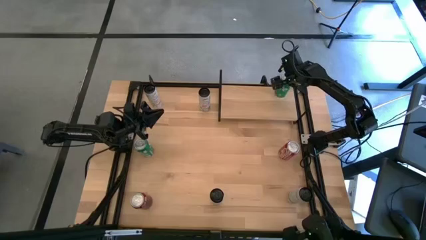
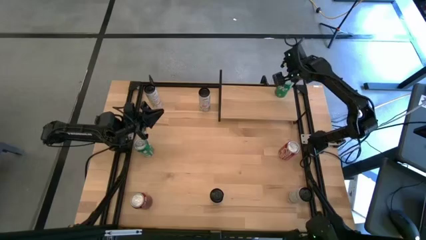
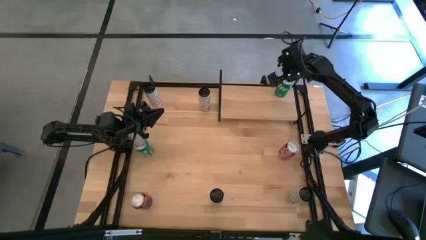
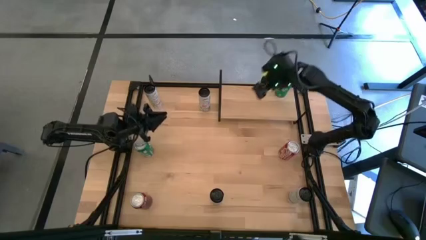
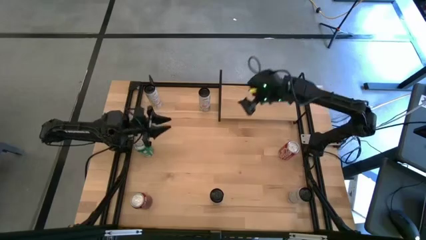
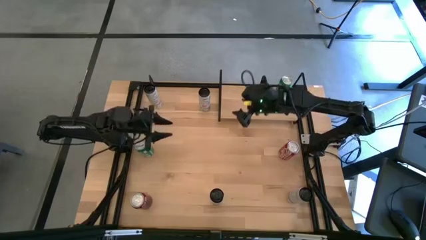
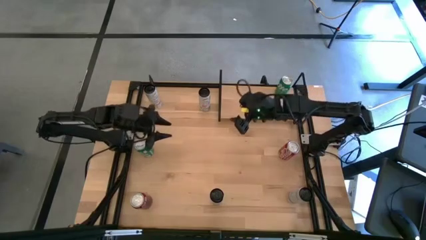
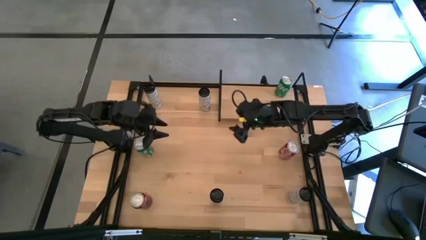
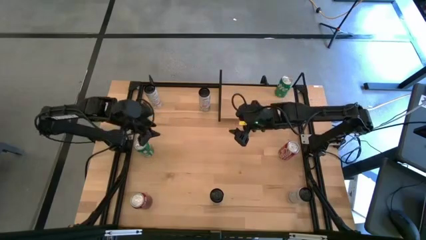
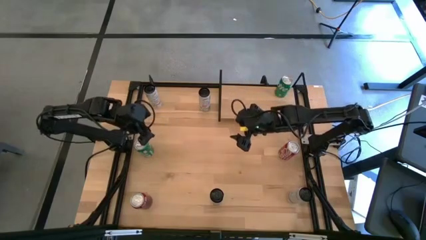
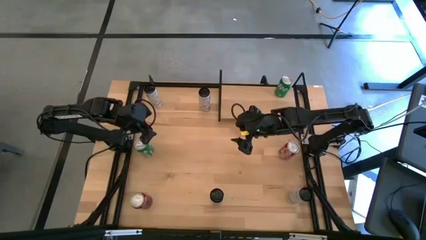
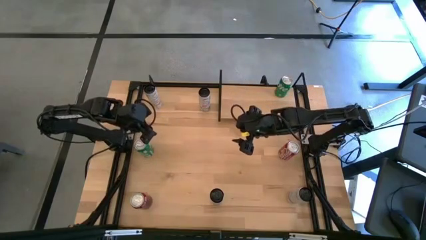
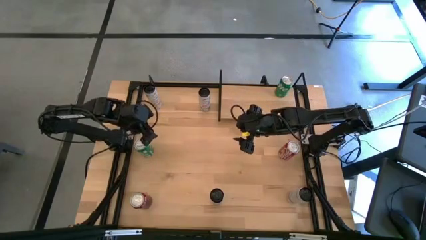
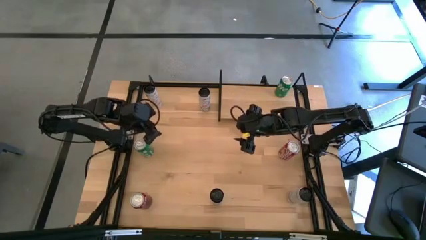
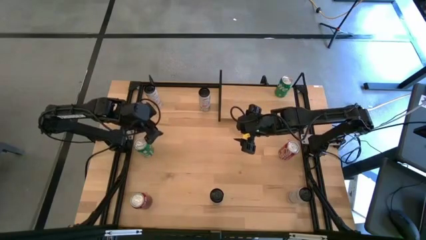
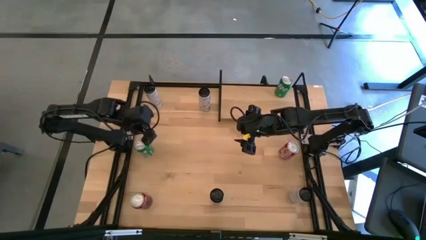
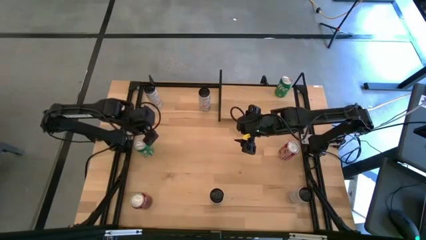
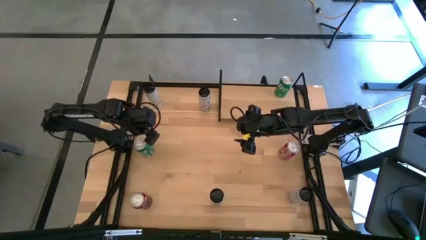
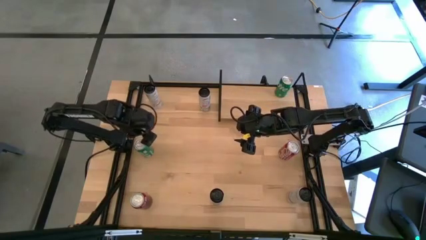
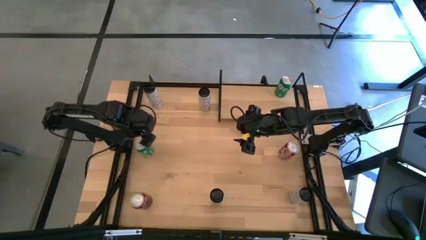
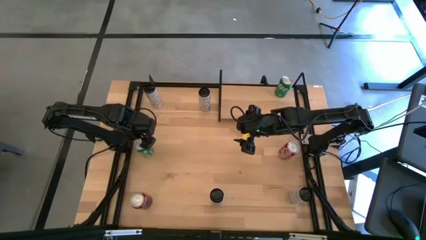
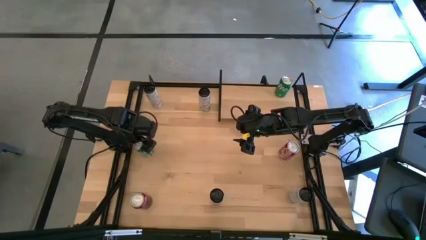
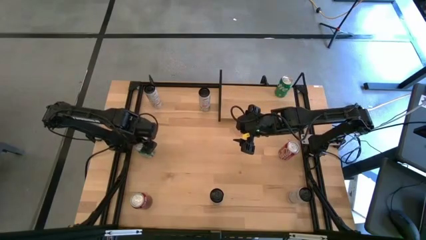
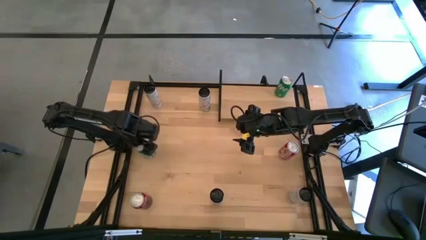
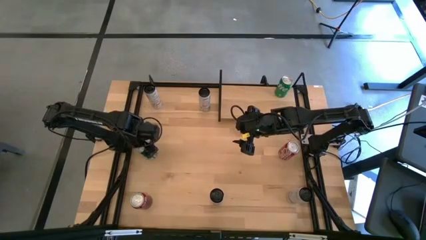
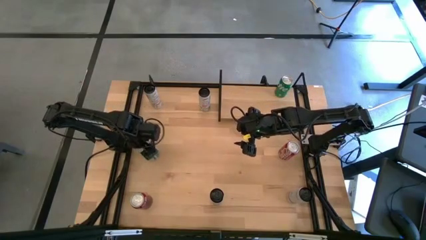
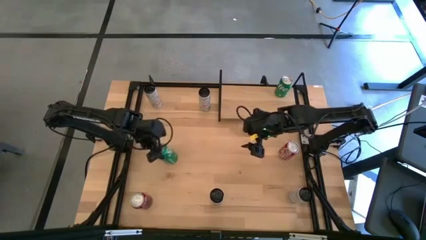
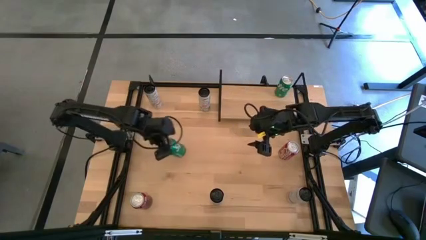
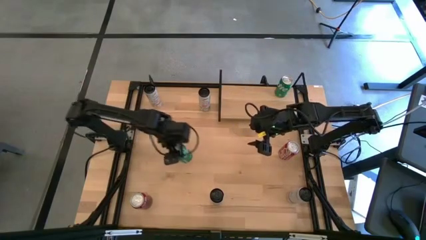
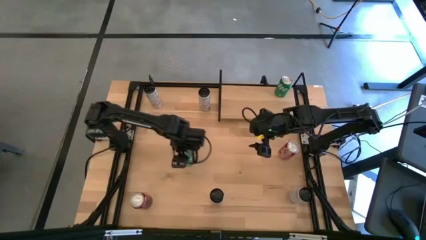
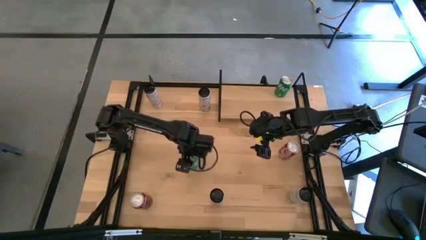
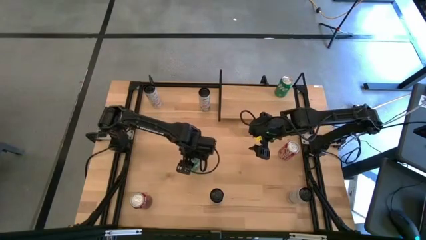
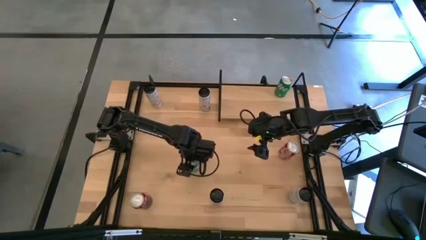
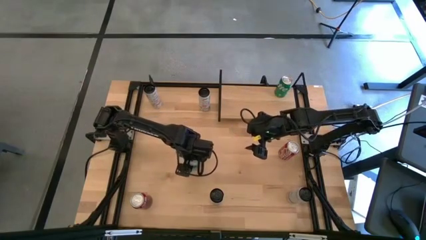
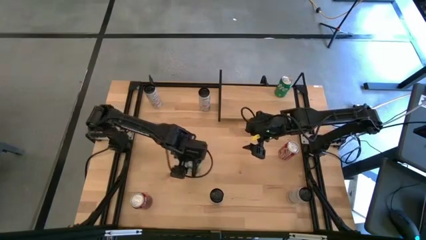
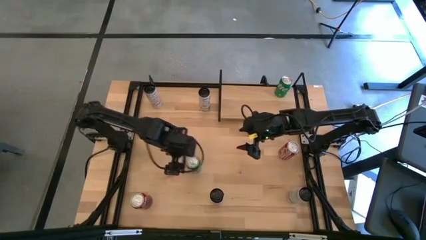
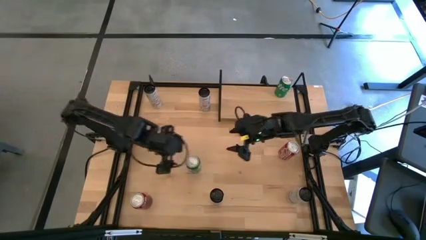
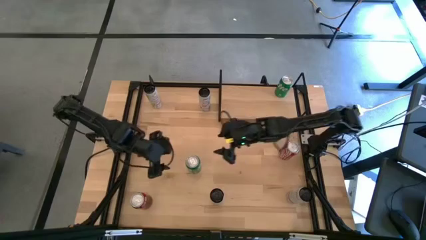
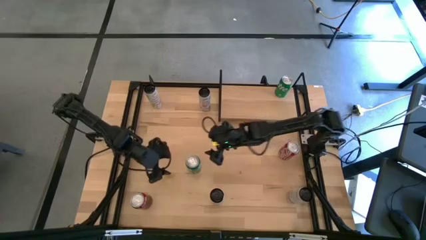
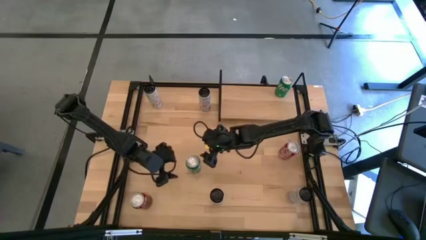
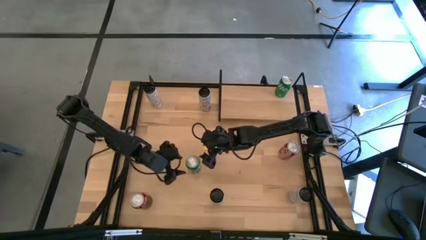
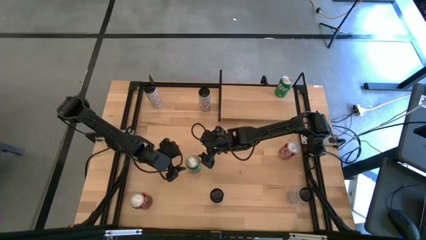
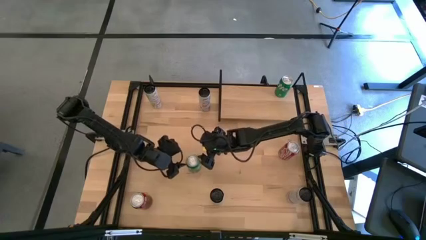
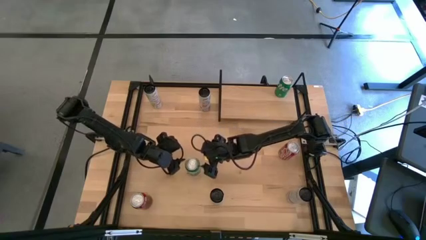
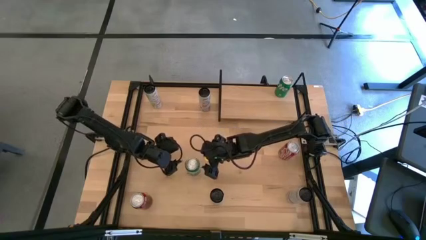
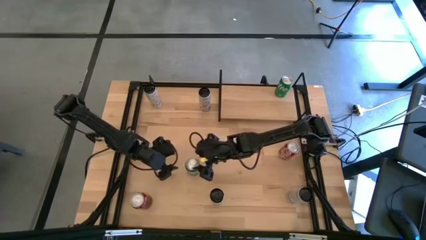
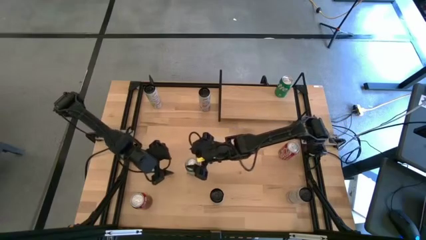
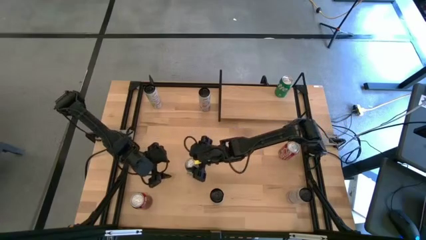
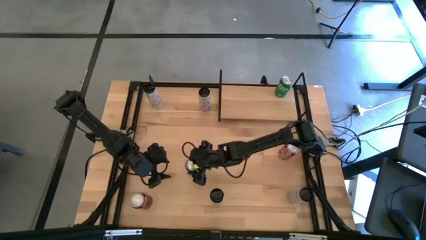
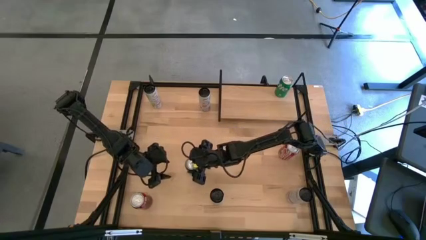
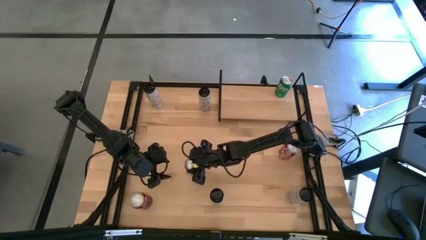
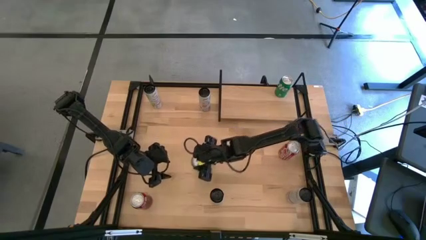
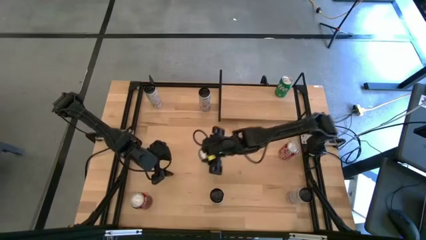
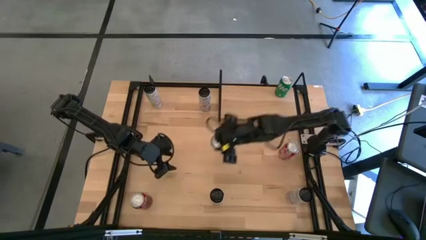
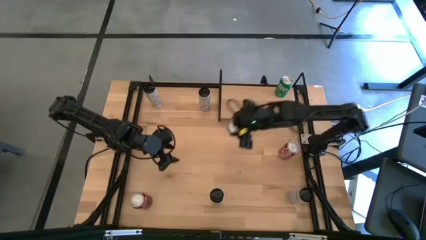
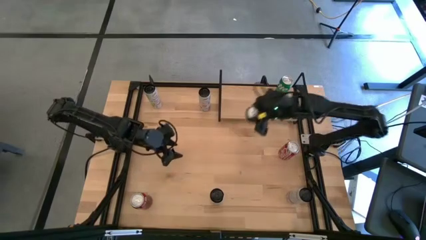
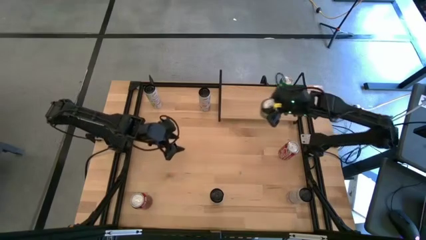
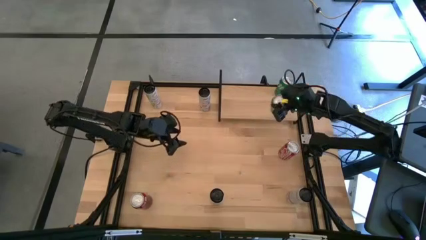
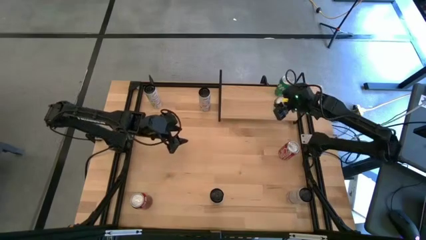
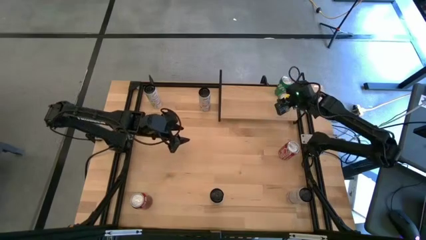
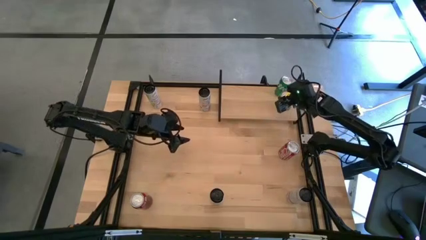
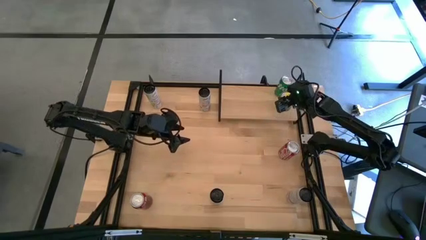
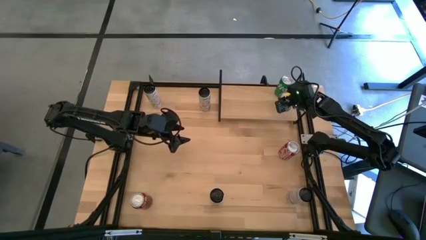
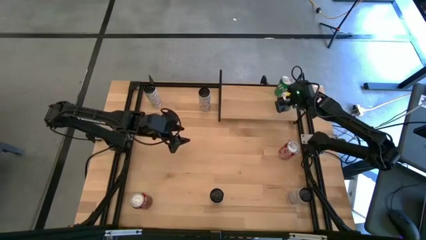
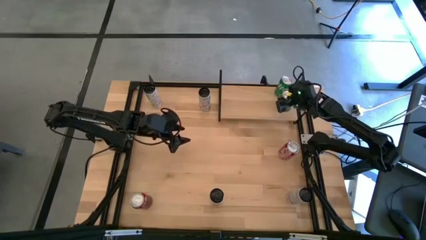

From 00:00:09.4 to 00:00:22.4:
Task: Place canned beverage on shelf
Put the green soda can on the shelf aligned with the other green soda can
